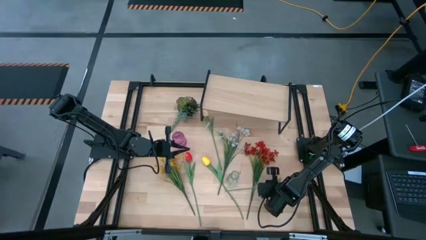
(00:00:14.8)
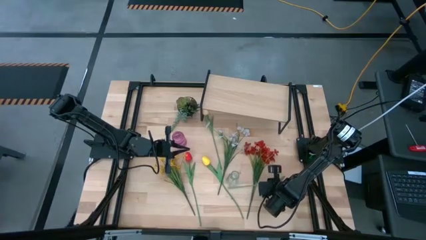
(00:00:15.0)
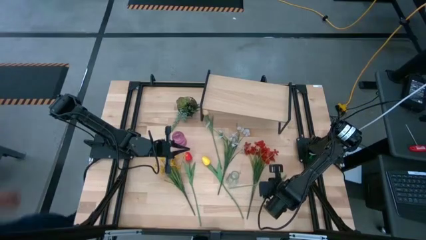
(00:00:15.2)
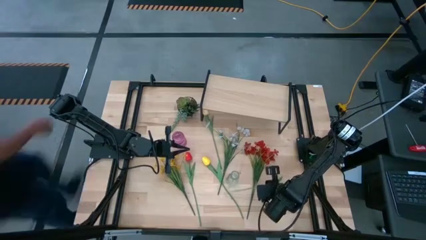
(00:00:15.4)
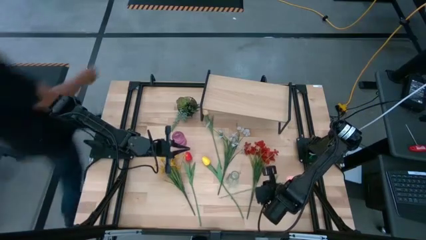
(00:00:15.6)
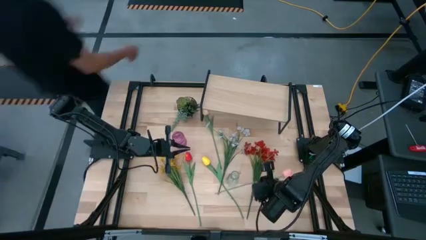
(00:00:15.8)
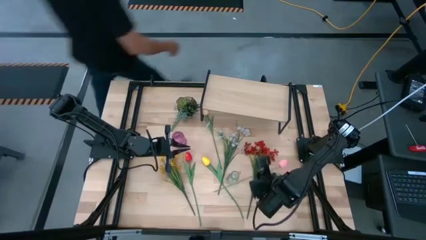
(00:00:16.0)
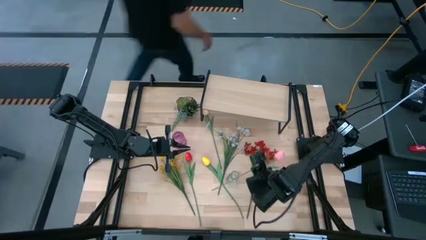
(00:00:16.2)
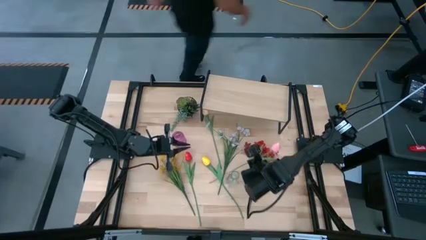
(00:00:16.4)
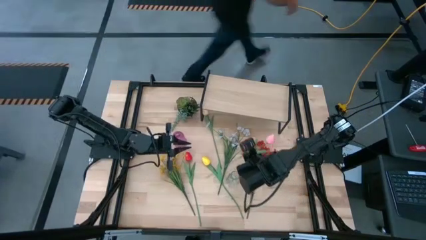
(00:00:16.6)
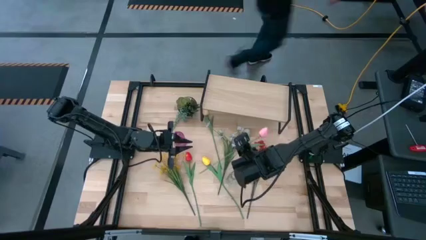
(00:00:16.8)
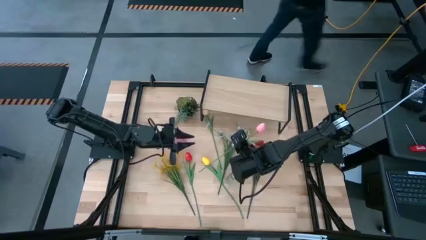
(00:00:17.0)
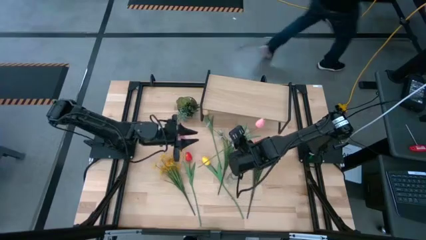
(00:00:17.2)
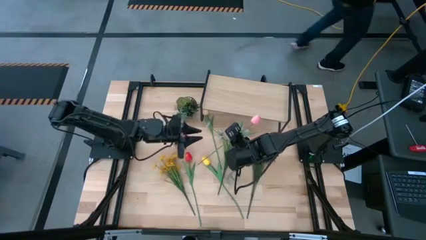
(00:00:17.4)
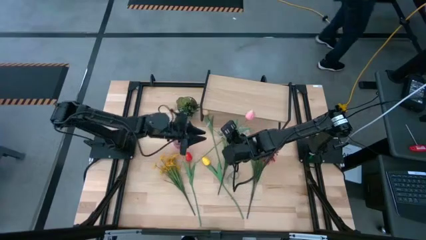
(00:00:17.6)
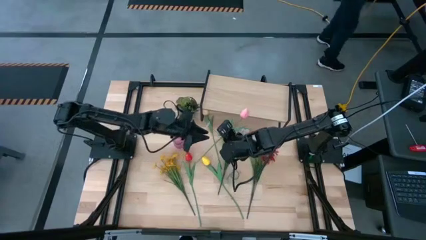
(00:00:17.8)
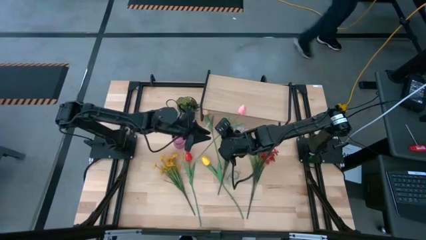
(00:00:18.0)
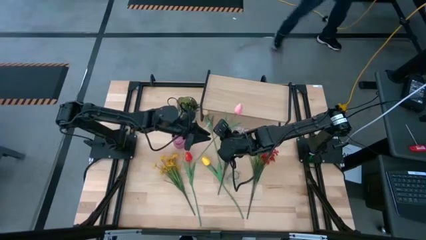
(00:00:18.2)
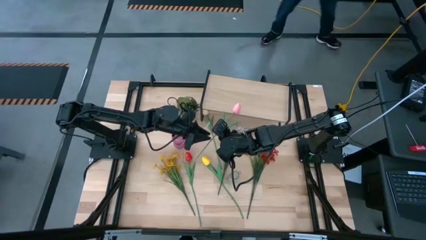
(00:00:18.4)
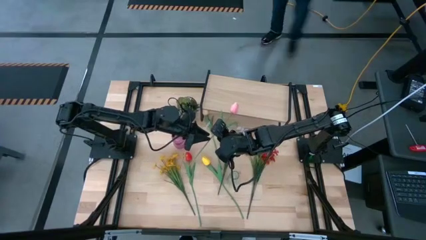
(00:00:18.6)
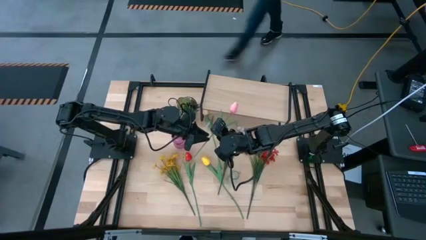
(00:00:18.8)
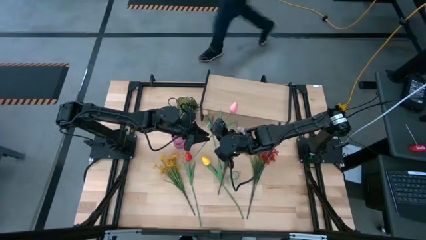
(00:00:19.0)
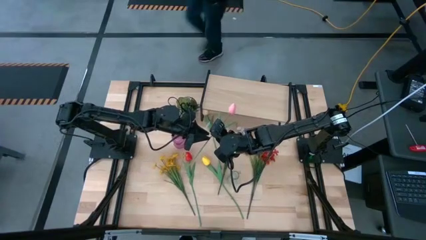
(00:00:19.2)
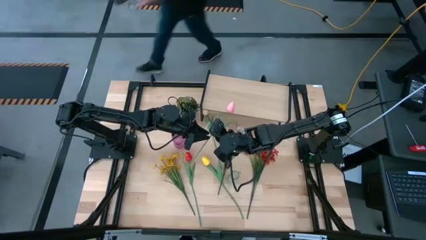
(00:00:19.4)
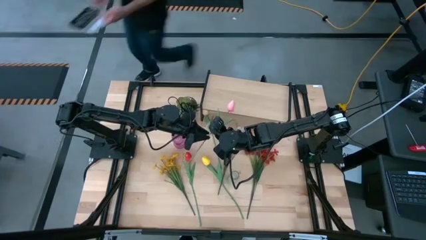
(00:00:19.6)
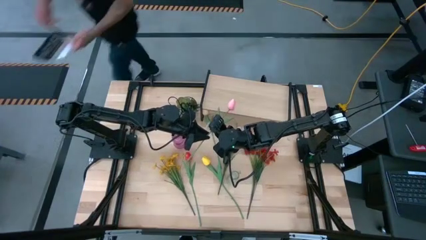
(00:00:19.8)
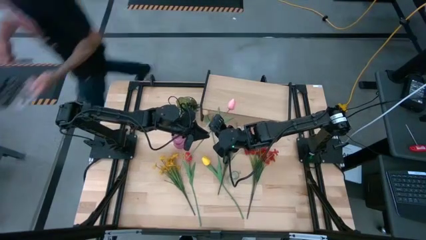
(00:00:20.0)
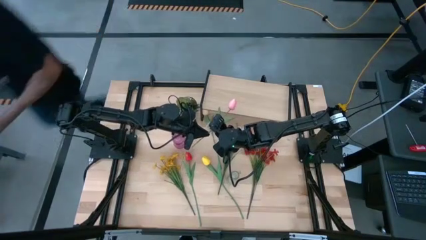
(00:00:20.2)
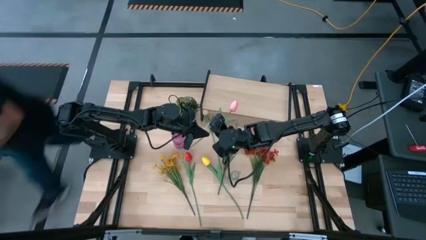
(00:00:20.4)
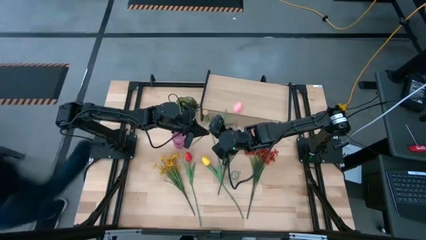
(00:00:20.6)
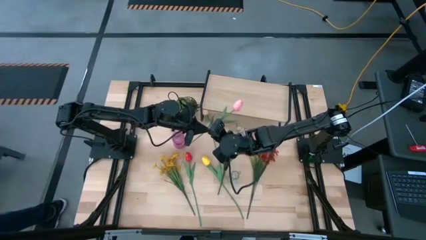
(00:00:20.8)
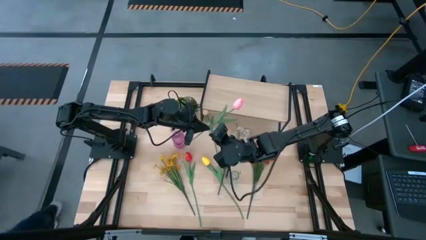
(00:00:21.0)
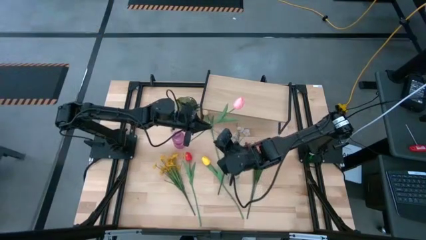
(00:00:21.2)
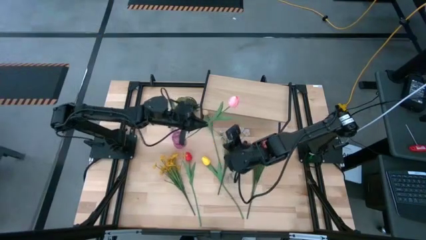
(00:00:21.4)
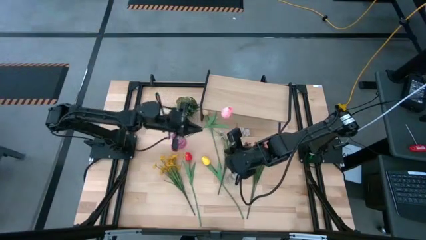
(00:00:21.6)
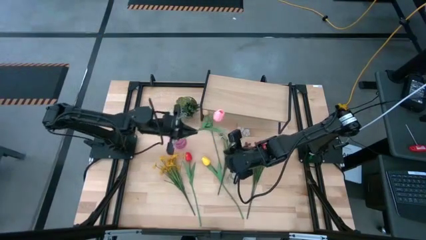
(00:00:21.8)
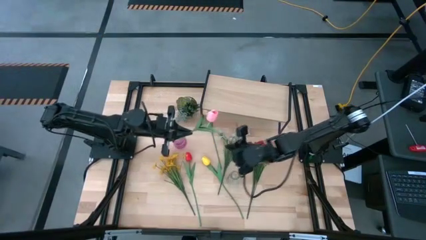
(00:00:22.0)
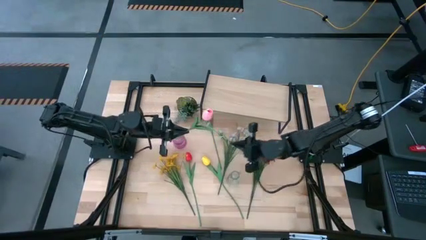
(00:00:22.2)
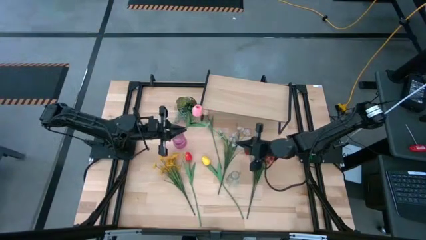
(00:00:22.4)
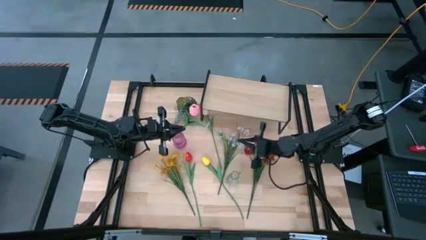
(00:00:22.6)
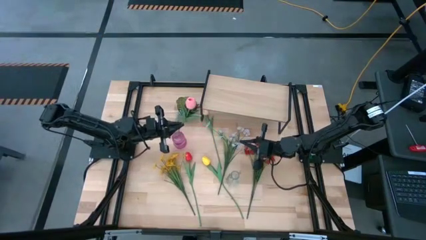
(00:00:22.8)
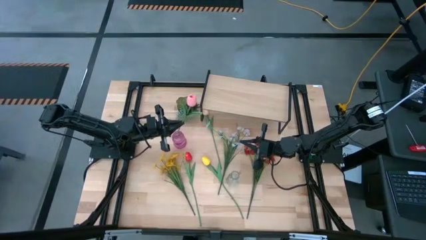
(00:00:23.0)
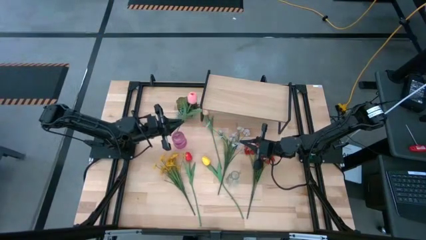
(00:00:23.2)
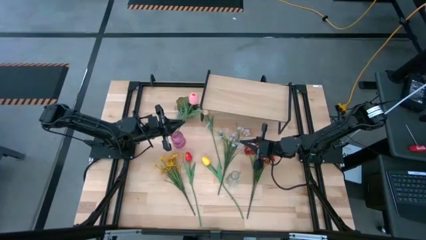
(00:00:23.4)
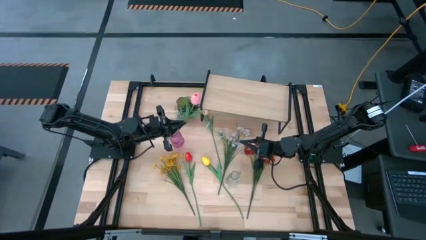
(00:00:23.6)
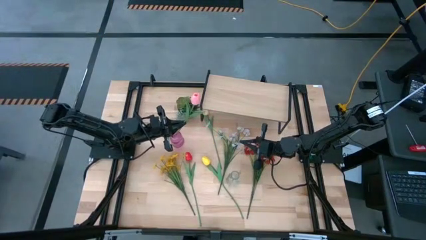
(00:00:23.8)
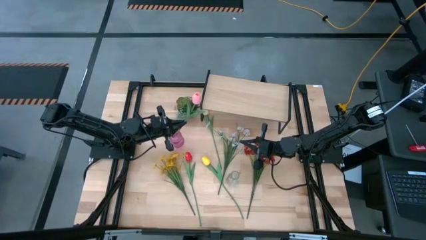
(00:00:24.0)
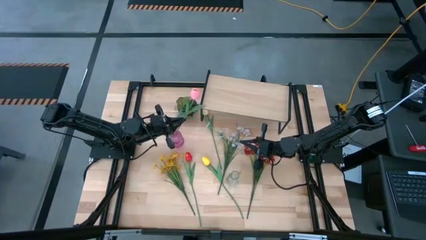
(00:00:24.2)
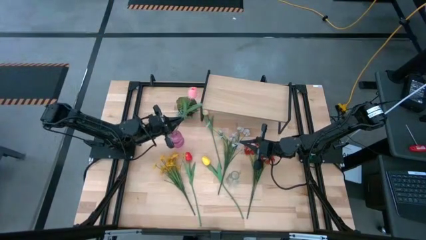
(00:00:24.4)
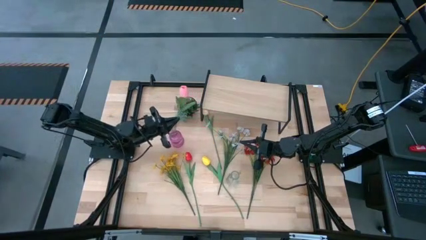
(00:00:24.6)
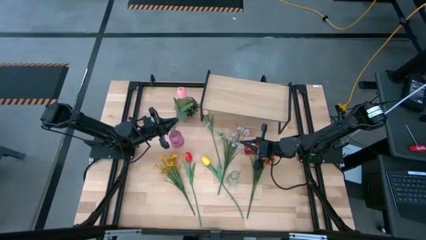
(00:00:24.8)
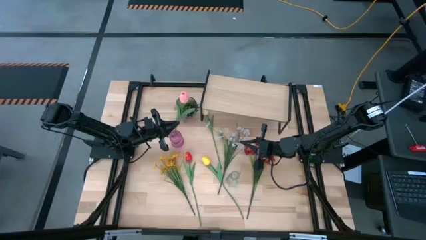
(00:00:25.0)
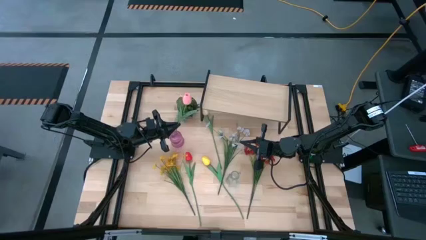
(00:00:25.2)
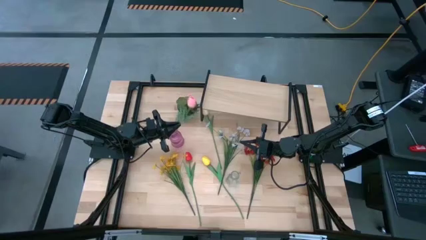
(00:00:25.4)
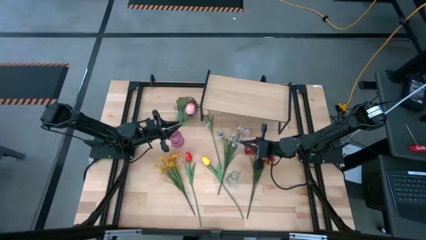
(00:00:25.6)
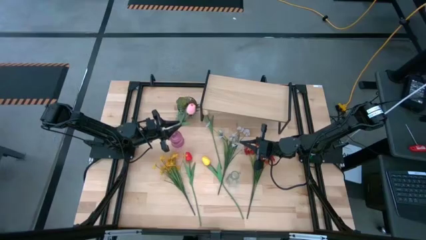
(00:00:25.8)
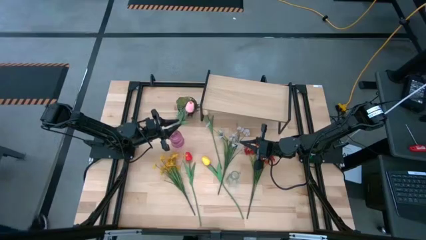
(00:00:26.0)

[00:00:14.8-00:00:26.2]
Task: Pick and place flowers into a vace then onto a shelf
Put the pink flower into the violet vase

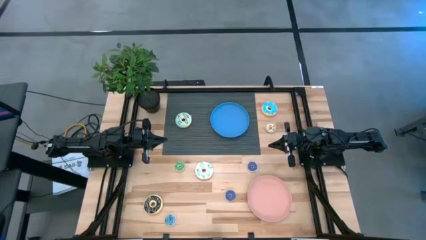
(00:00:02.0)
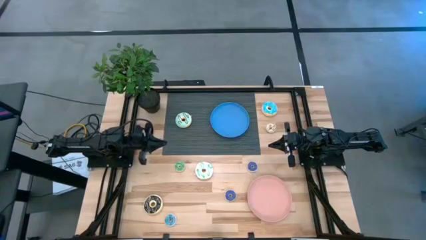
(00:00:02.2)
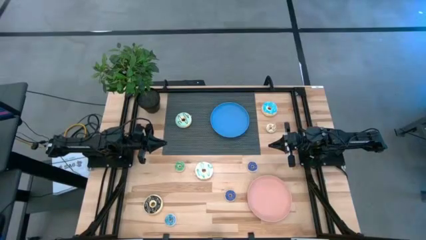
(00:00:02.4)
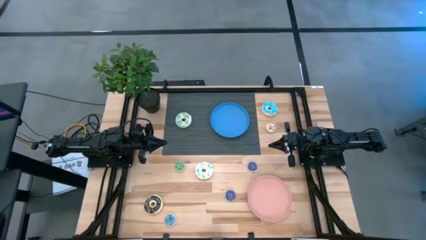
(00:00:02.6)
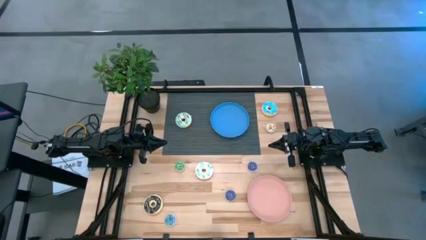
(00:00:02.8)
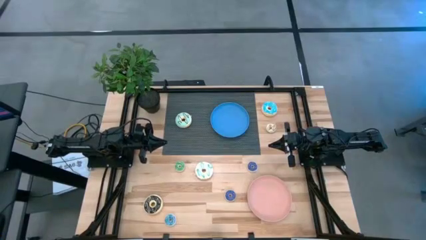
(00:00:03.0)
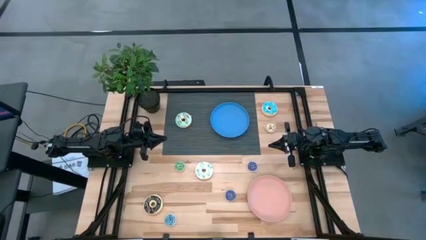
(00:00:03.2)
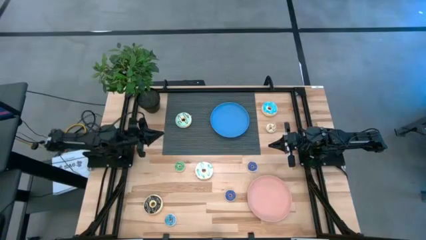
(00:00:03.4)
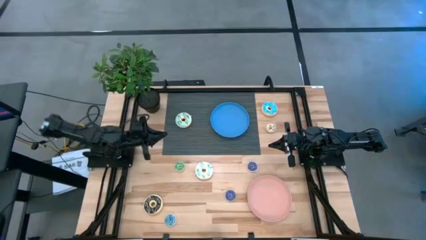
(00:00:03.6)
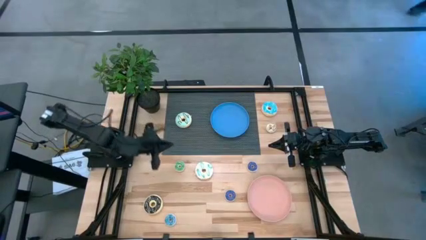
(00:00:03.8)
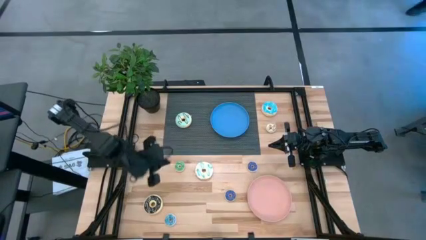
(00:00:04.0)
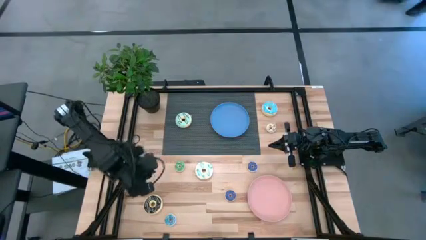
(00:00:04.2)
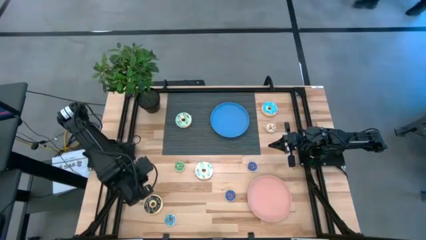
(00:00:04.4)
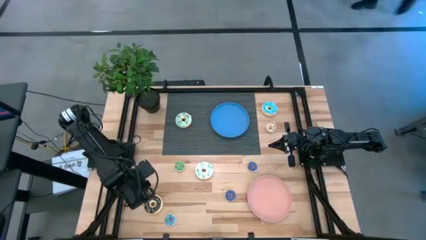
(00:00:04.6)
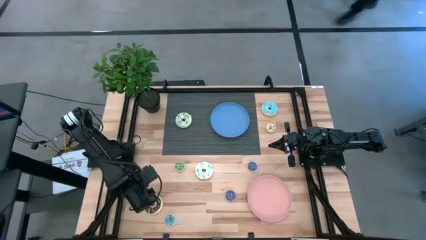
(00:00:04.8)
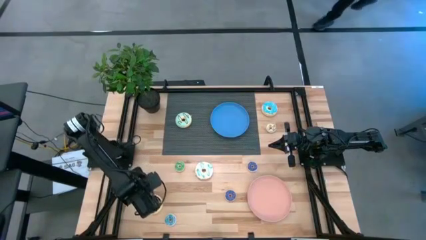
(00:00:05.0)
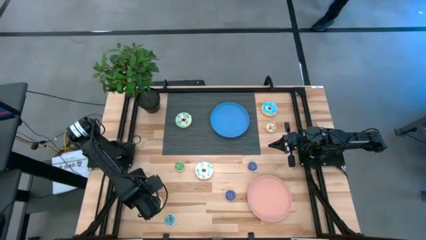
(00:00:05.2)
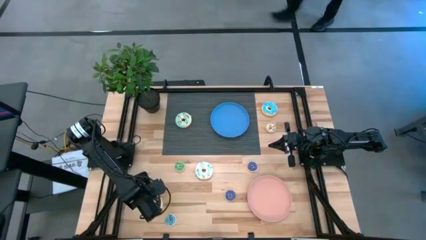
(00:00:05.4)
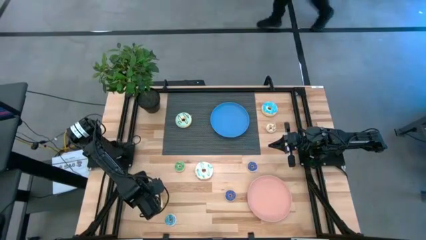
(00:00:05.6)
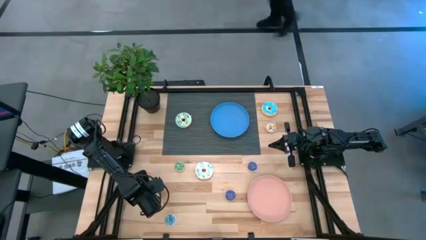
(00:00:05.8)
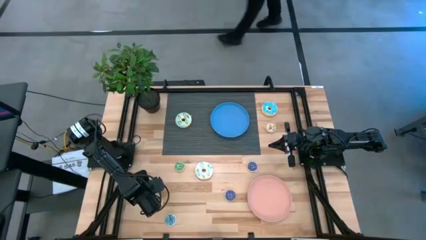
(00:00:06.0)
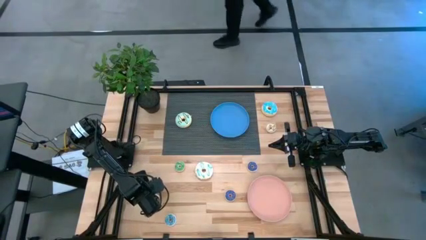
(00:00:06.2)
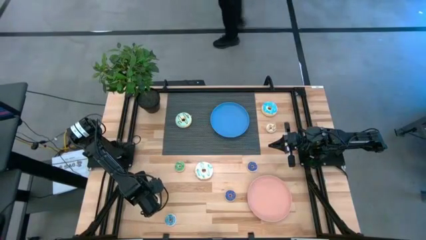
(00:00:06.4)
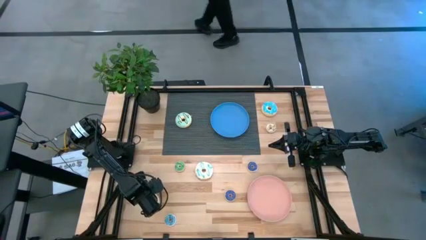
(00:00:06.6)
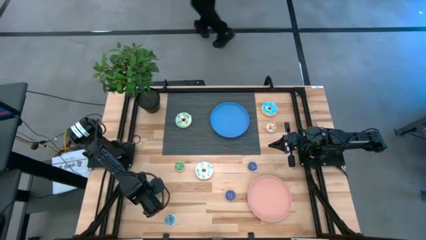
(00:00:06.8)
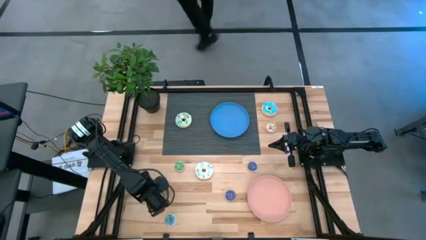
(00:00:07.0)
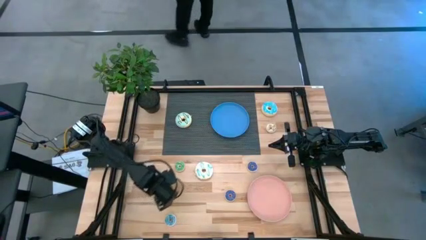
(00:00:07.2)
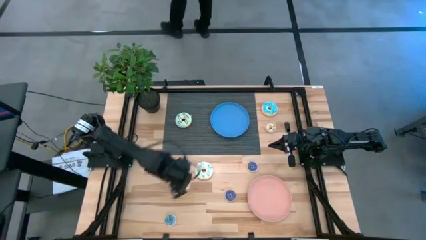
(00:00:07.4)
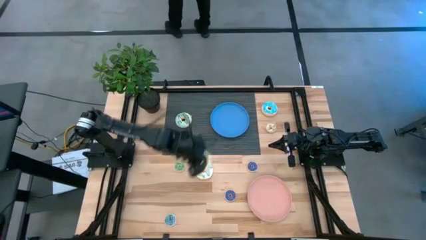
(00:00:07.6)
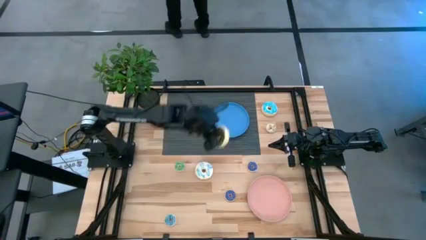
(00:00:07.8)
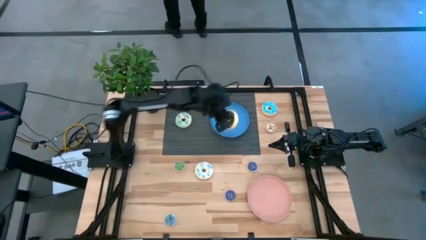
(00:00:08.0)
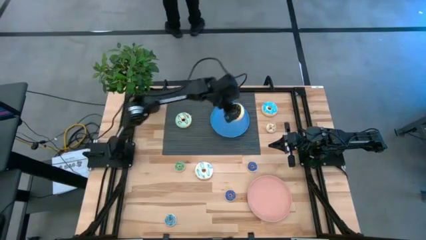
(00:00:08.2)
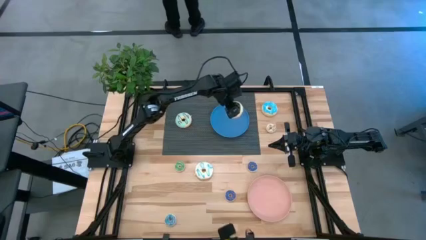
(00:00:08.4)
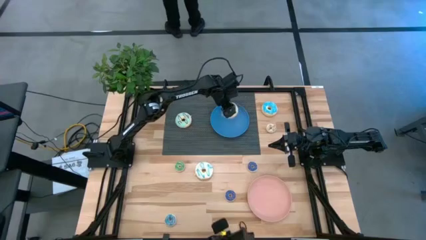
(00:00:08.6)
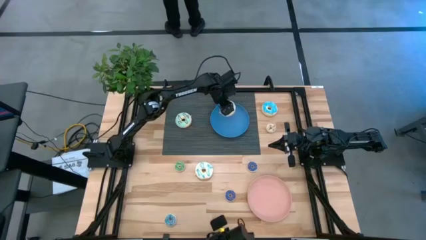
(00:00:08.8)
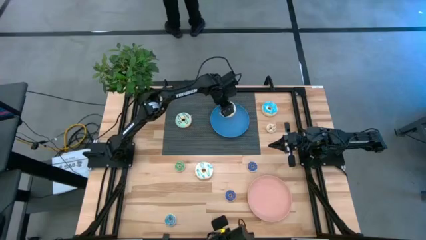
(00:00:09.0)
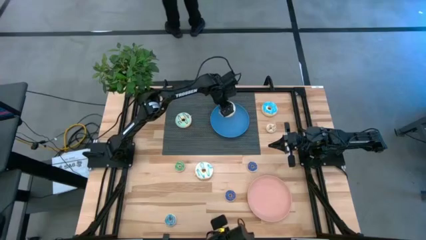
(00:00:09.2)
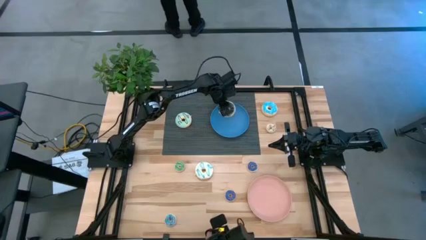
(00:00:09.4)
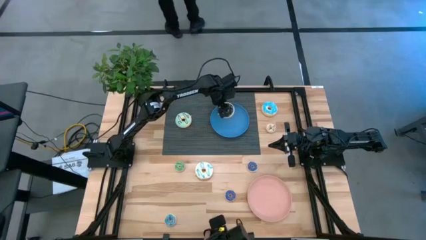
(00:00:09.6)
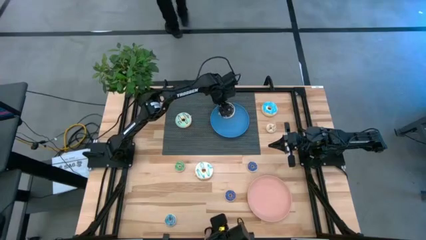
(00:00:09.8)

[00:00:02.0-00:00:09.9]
Task: Pick & Place donuts
Put the large black donut on the blue plate
